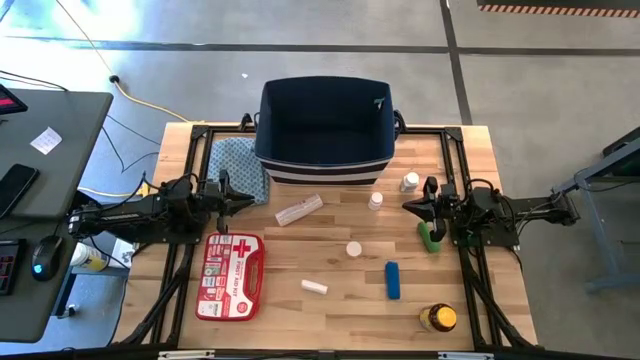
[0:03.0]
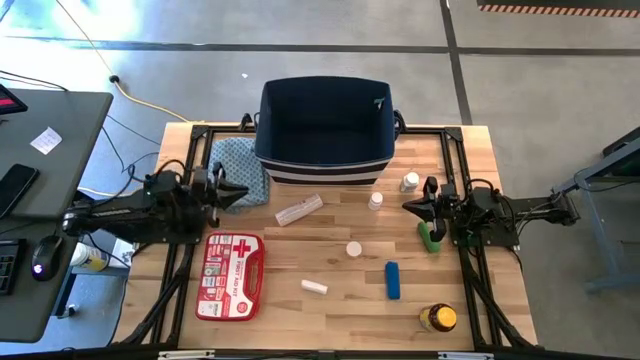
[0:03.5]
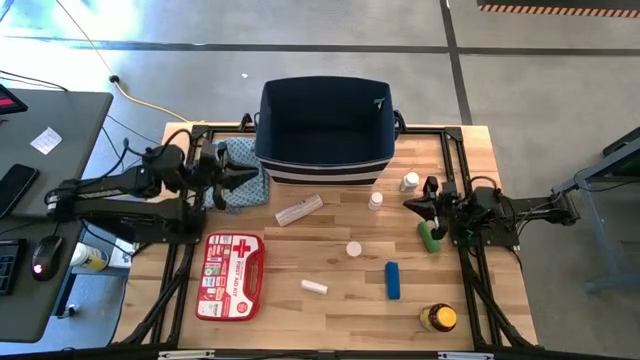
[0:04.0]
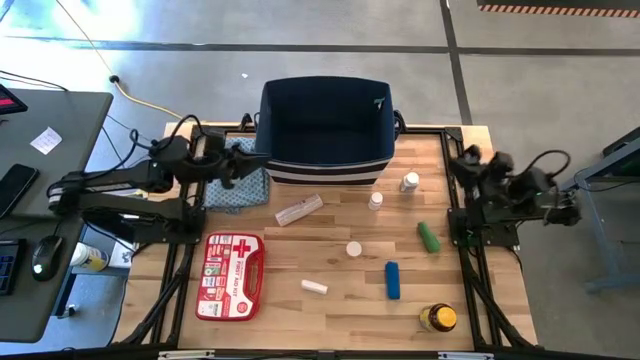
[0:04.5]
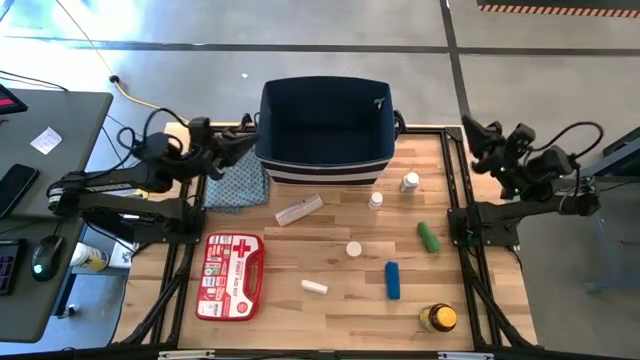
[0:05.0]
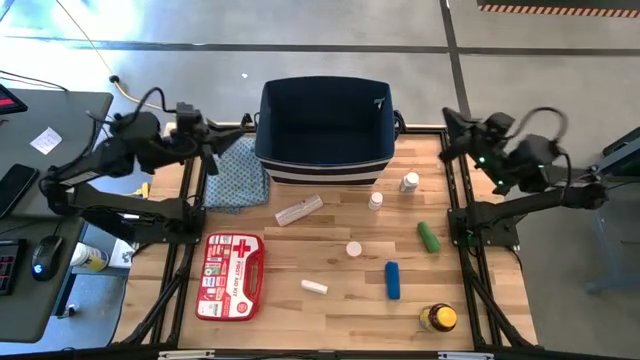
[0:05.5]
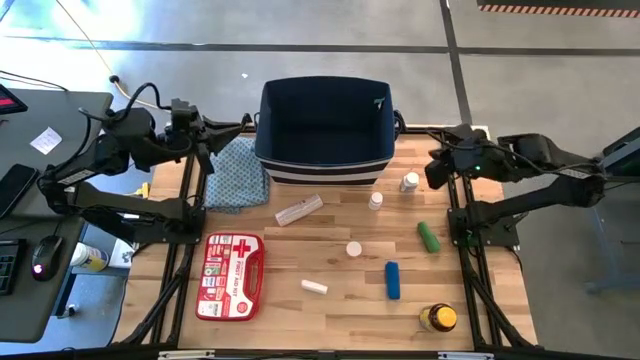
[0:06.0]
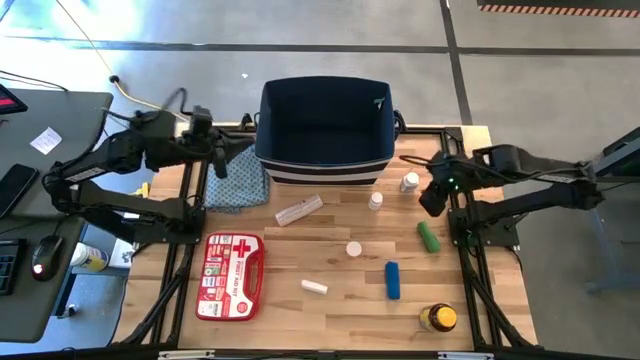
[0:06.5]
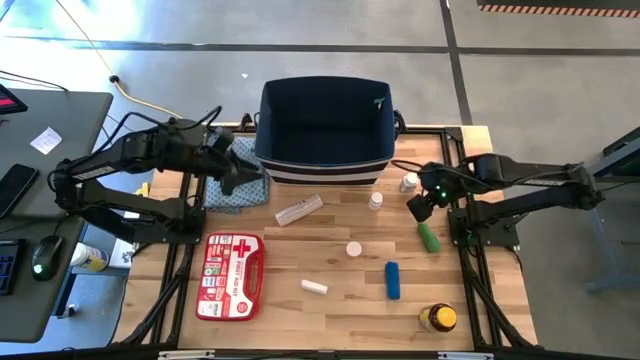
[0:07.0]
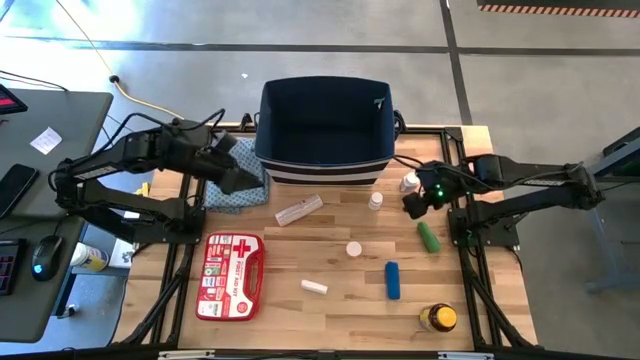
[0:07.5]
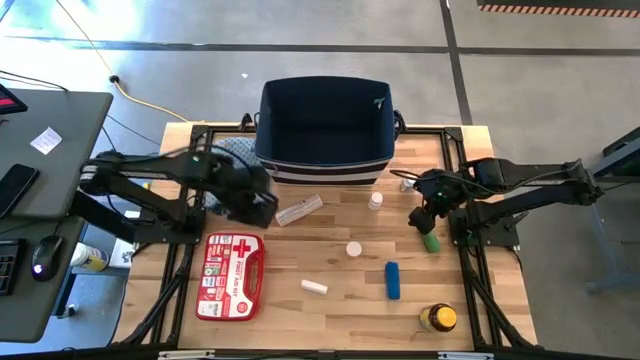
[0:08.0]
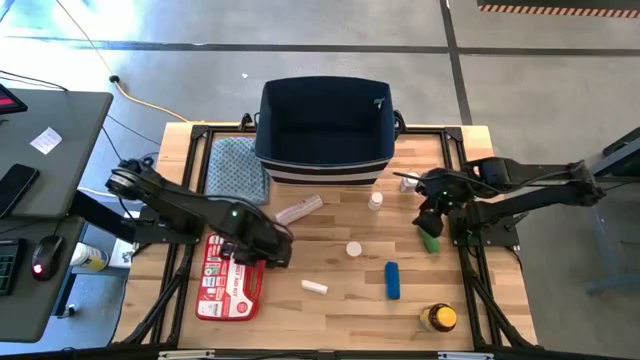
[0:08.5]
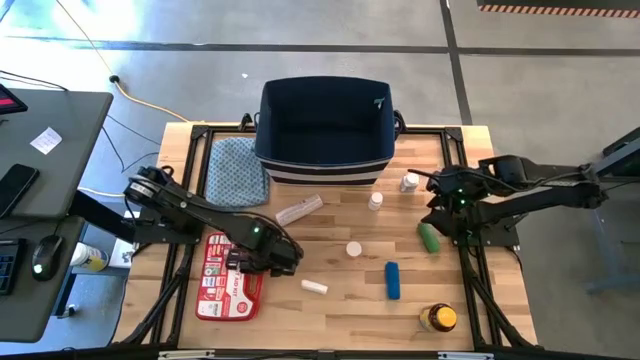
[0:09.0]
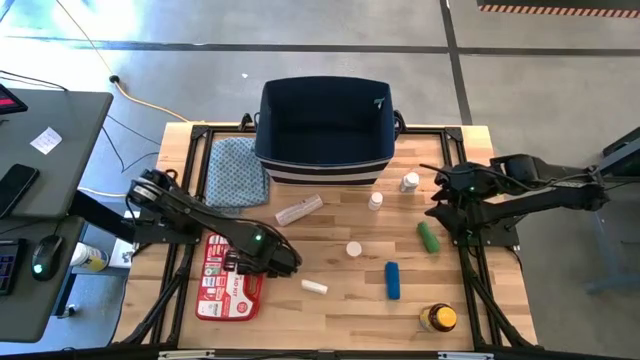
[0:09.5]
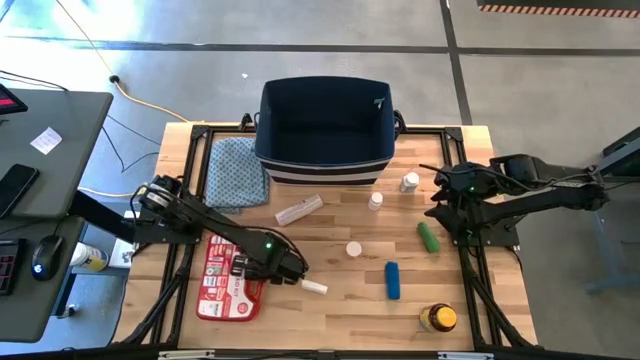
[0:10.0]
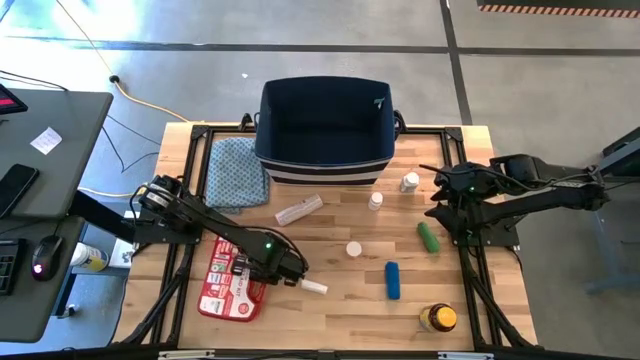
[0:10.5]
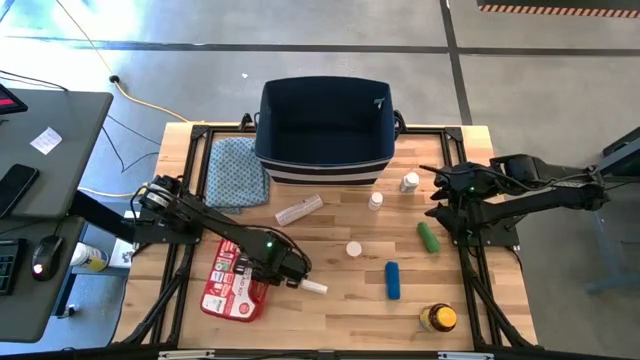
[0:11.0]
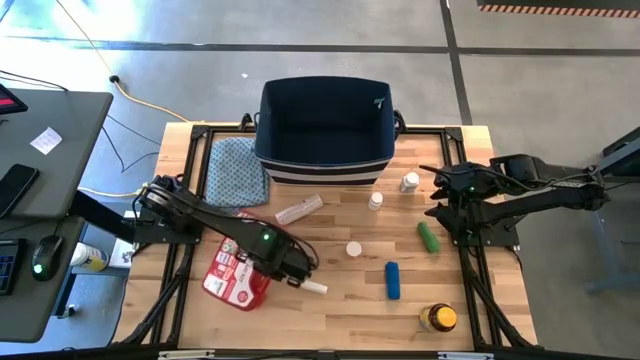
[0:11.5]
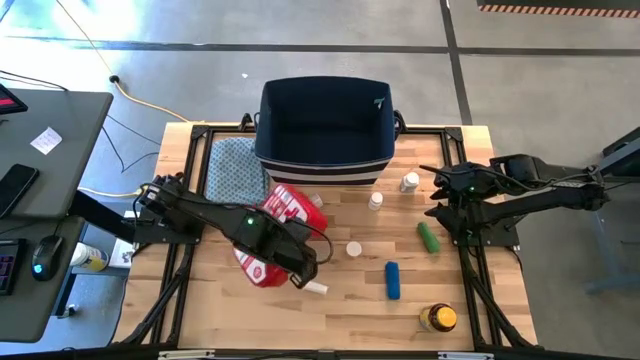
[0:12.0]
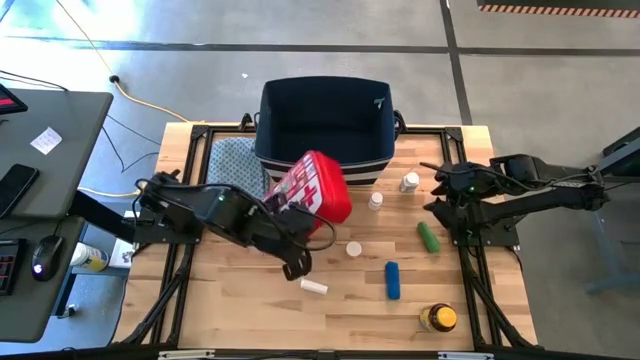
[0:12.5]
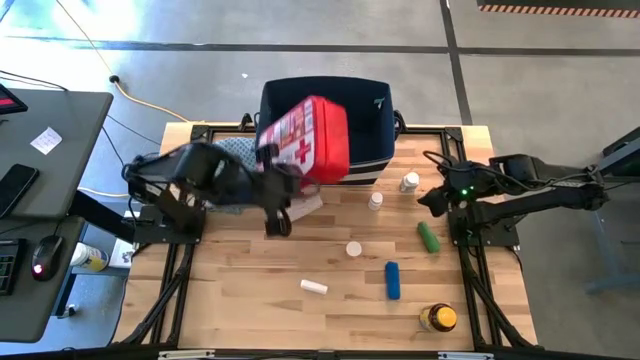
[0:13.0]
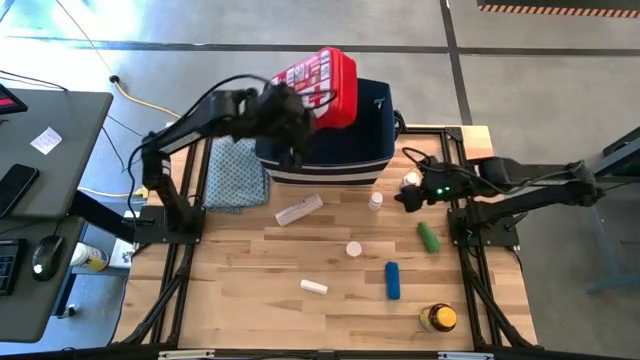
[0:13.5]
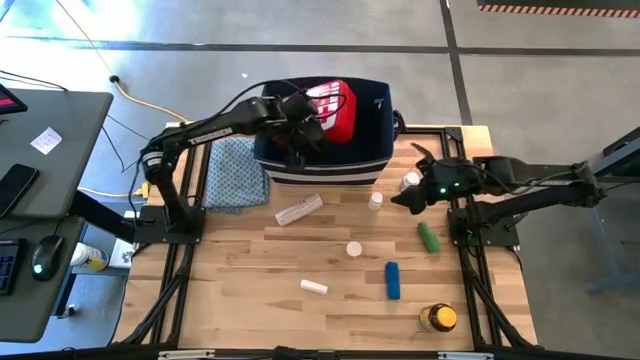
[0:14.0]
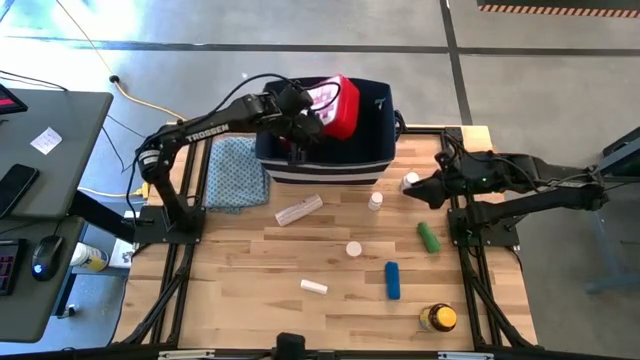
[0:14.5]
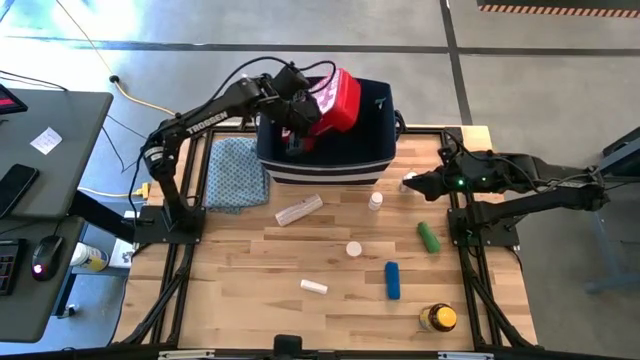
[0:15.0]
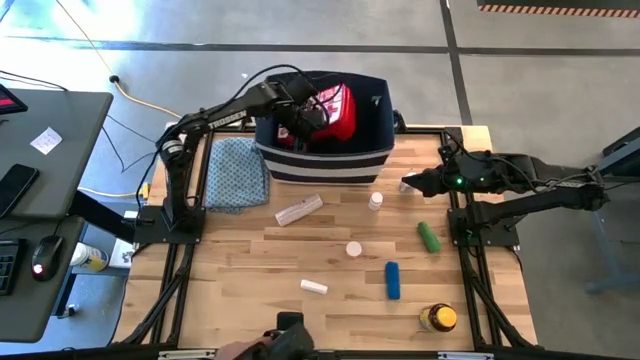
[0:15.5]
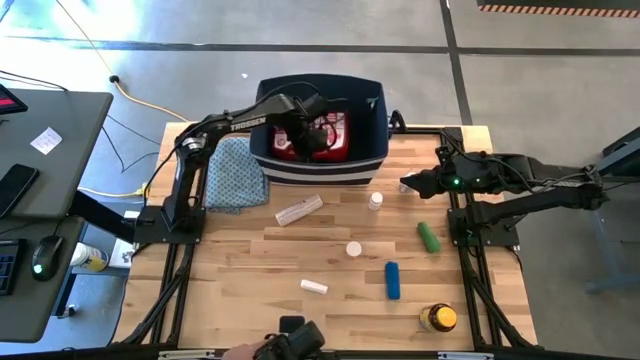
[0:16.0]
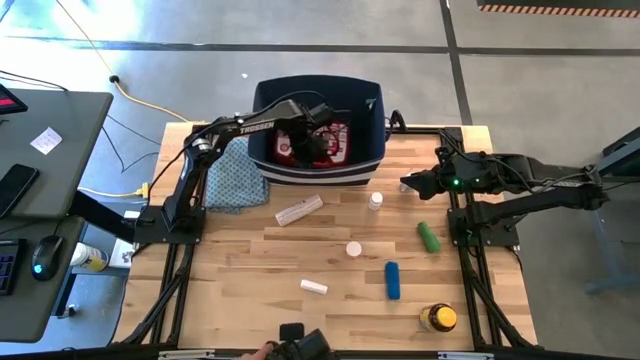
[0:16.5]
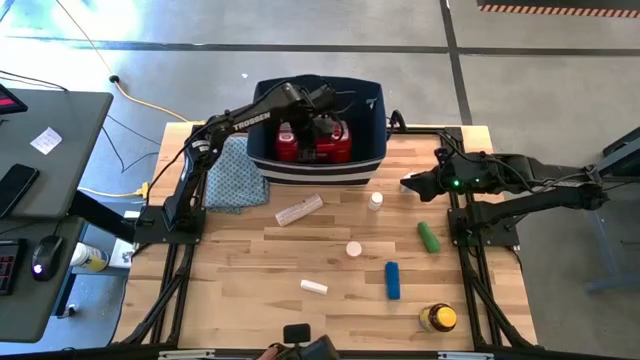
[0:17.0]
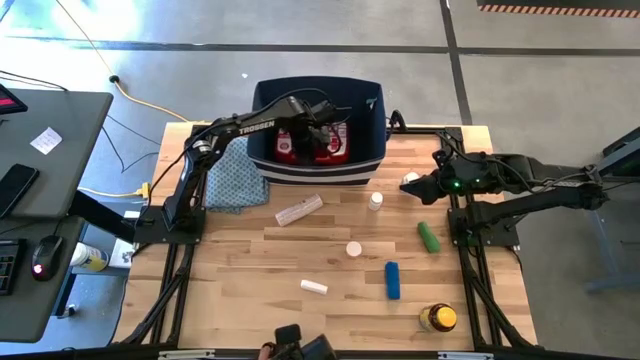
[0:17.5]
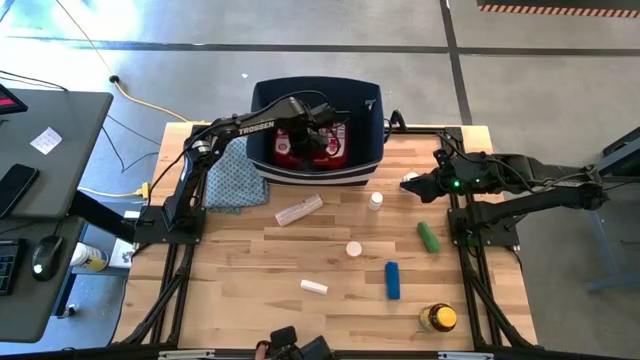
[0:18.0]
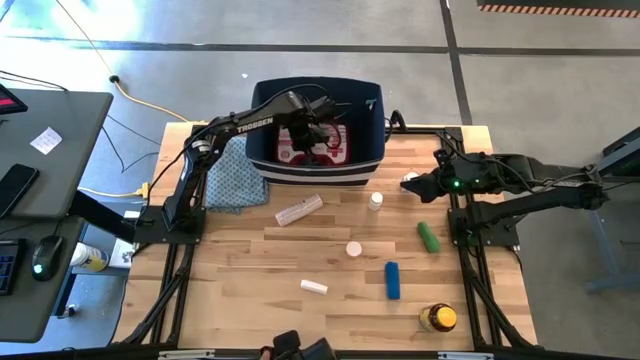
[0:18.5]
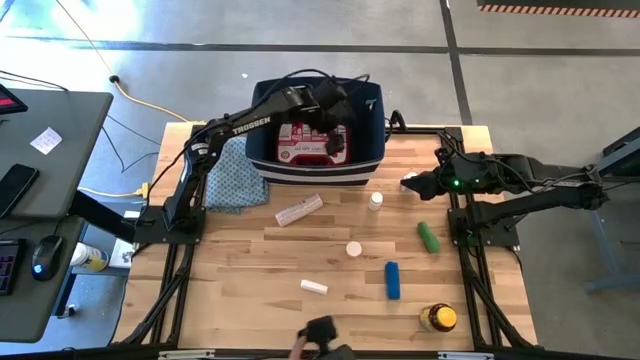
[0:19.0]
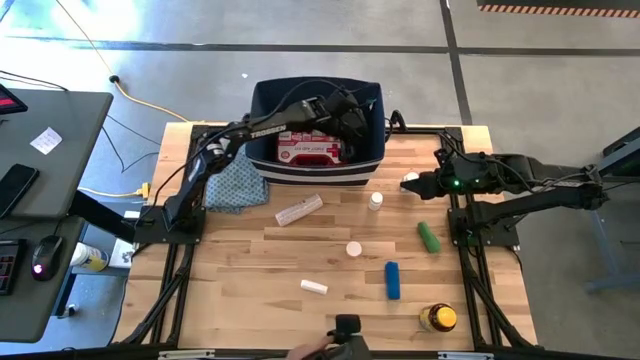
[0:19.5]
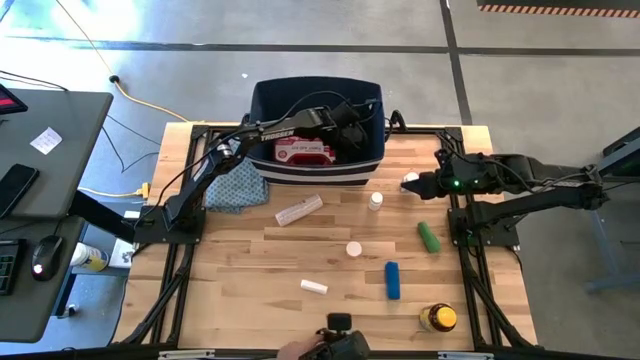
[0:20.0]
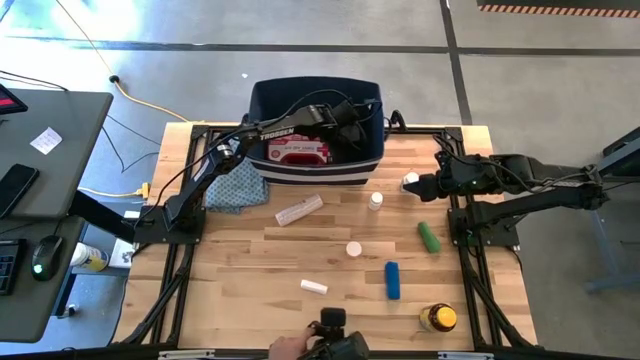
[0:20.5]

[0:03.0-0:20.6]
Task: Pick & place medical supplies in basket/bin
Put the red first aid kit box into the blue bin

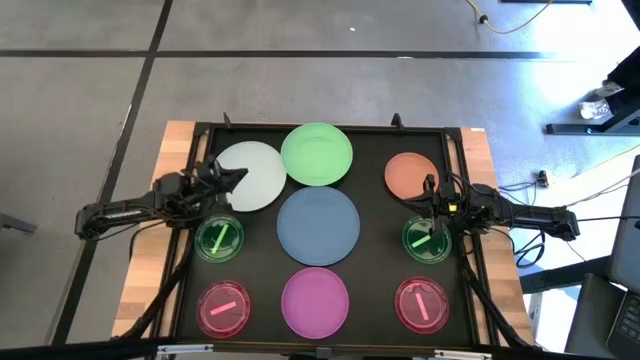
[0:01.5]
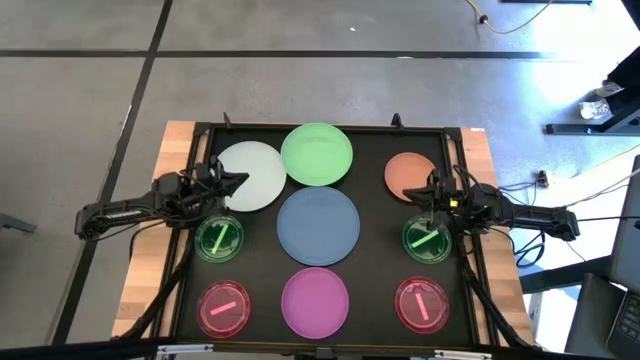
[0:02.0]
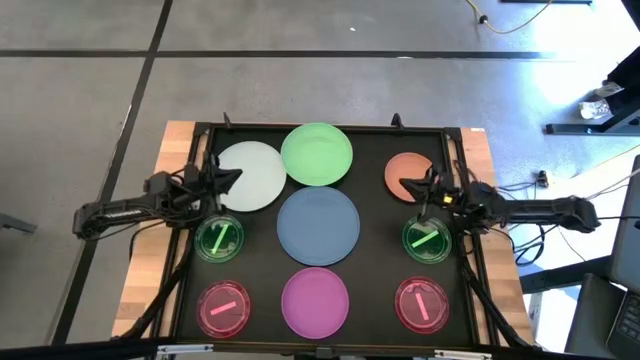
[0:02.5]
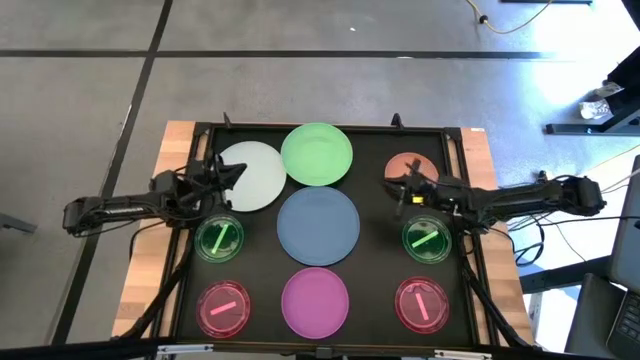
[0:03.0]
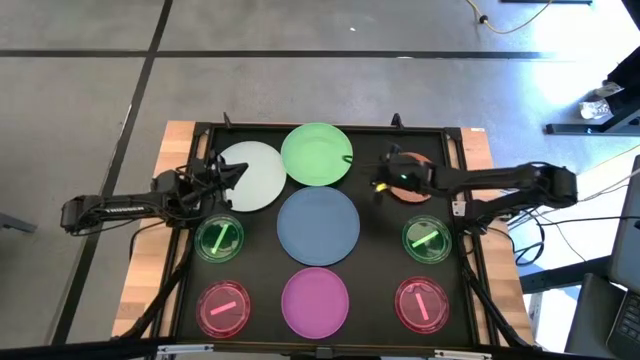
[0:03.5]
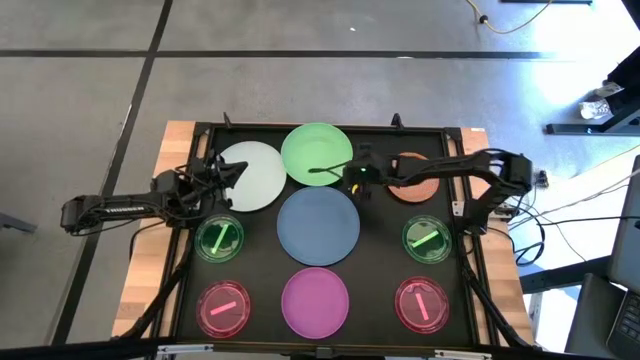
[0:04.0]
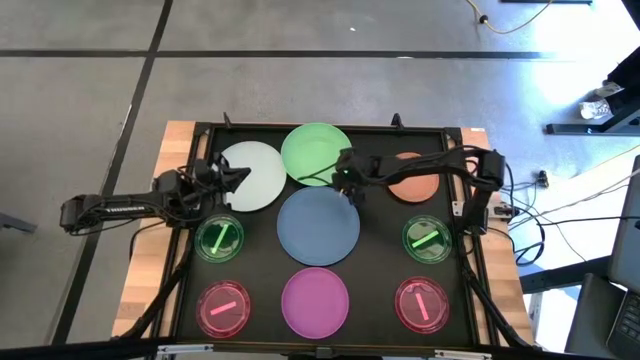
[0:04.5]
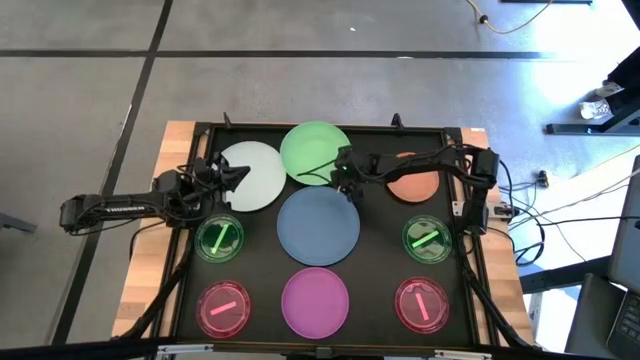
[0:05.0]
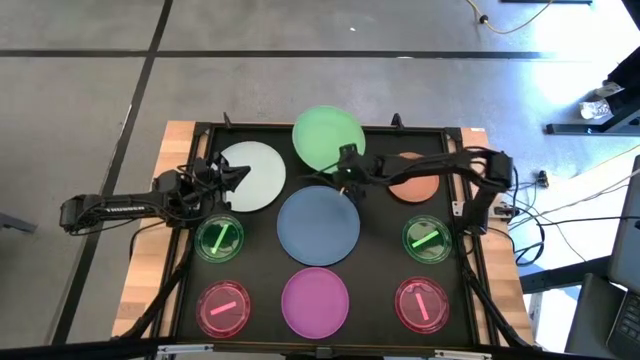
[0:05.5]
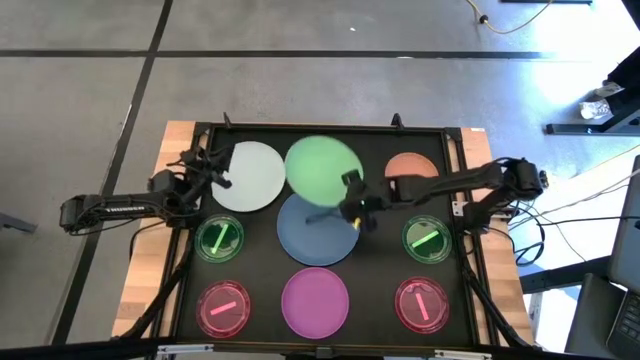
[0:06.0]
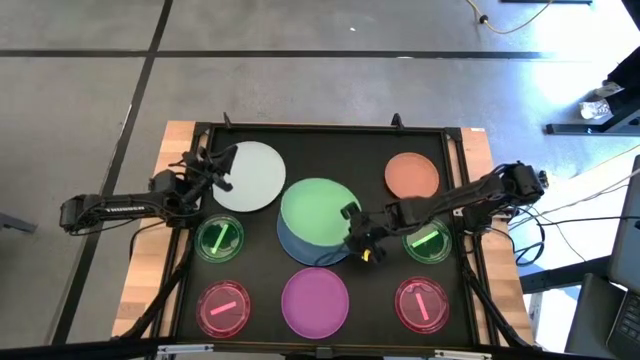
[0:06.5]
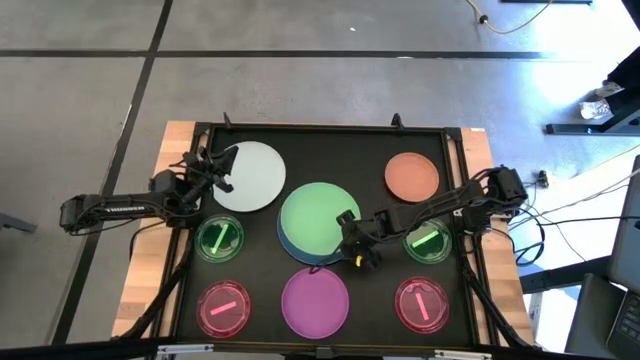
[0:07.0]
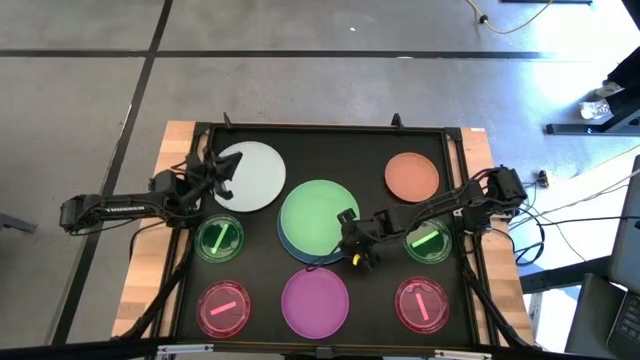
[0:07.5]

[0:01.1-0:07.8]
Task: Stack plastic plates
Stack the green plate on the blue plate
